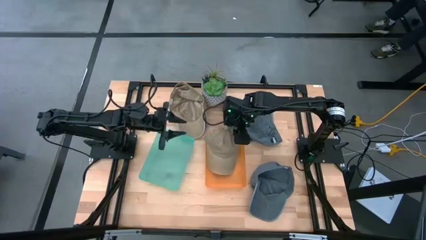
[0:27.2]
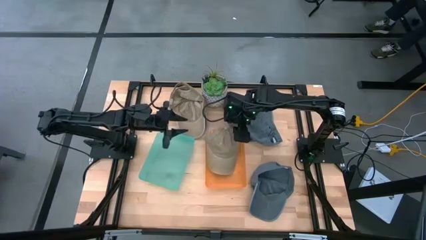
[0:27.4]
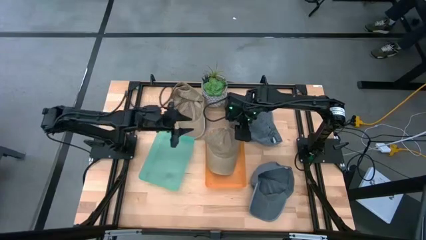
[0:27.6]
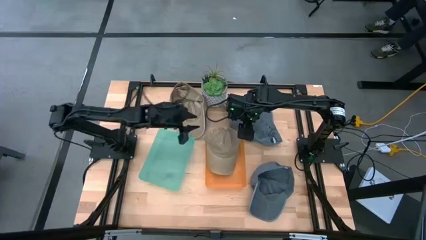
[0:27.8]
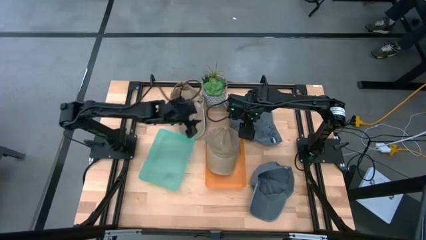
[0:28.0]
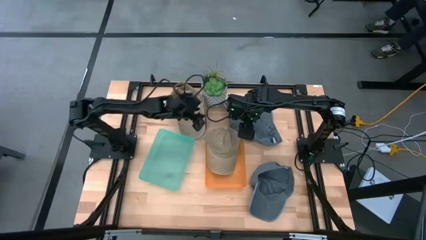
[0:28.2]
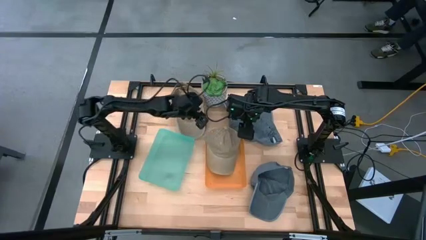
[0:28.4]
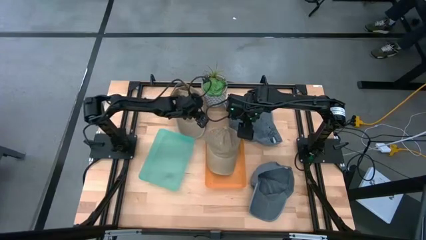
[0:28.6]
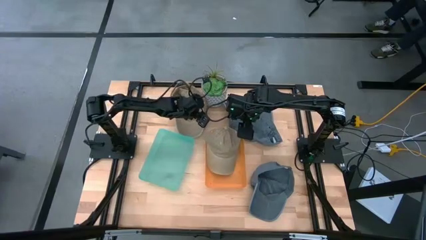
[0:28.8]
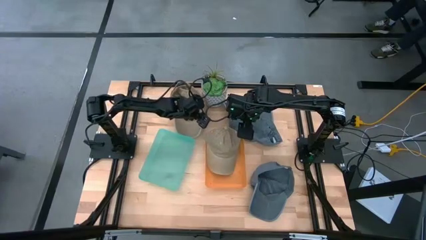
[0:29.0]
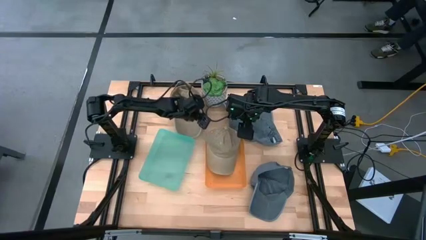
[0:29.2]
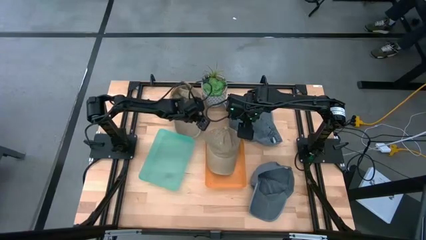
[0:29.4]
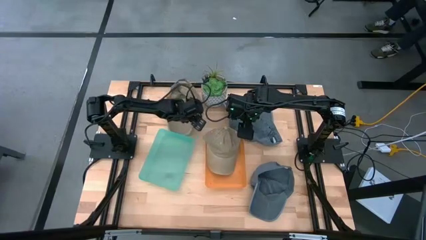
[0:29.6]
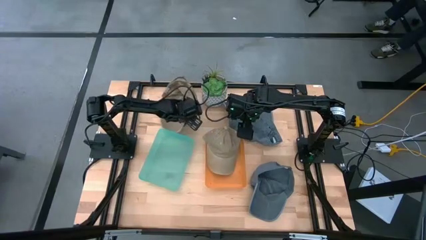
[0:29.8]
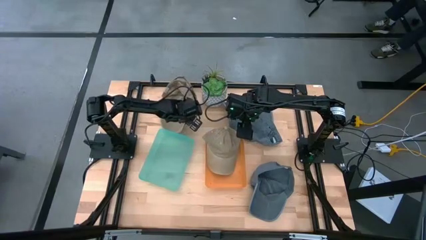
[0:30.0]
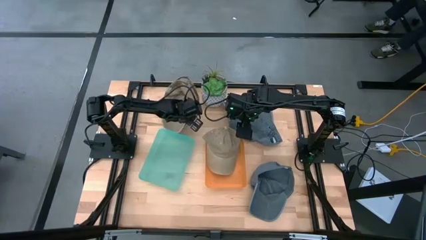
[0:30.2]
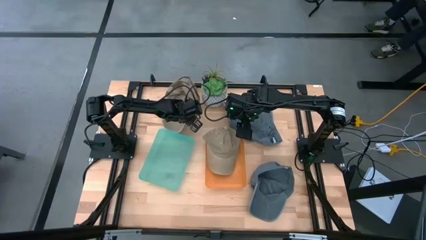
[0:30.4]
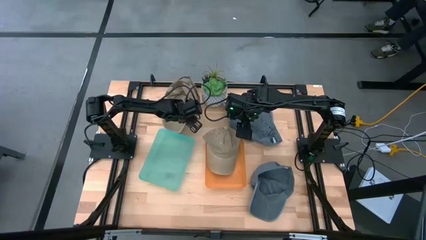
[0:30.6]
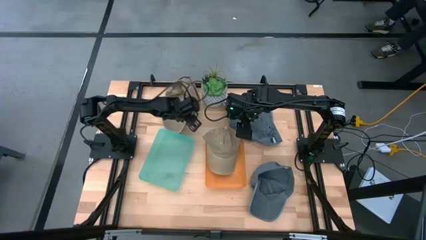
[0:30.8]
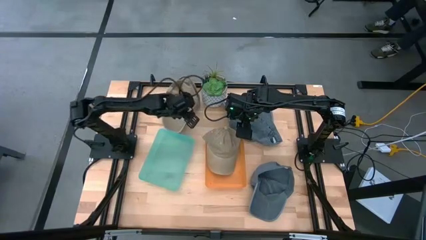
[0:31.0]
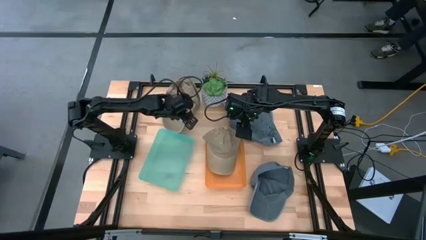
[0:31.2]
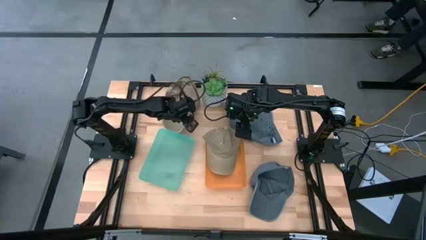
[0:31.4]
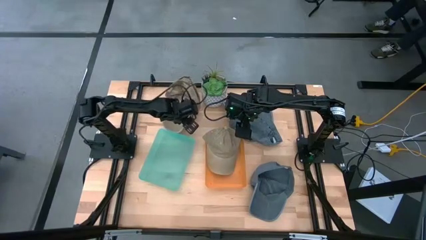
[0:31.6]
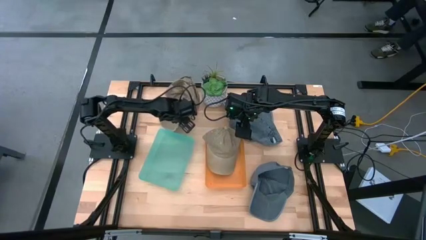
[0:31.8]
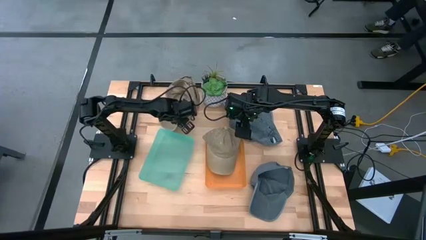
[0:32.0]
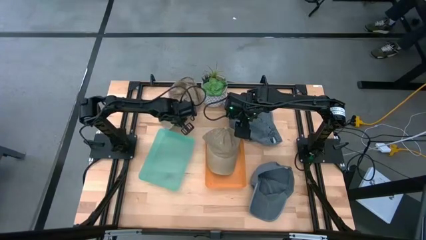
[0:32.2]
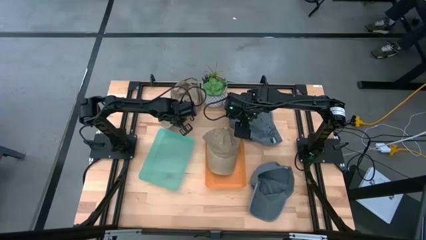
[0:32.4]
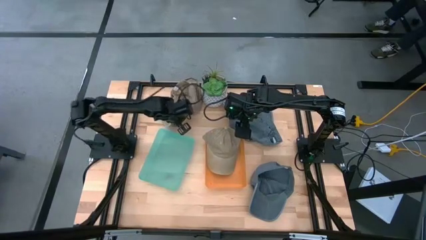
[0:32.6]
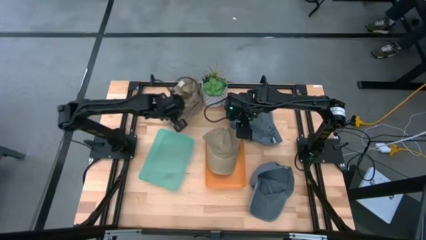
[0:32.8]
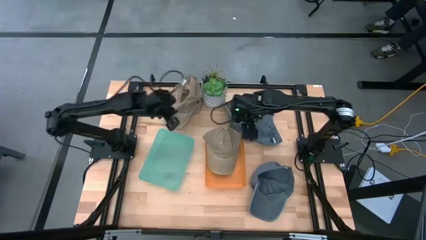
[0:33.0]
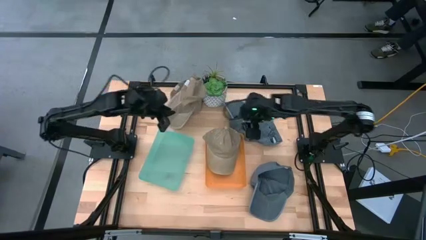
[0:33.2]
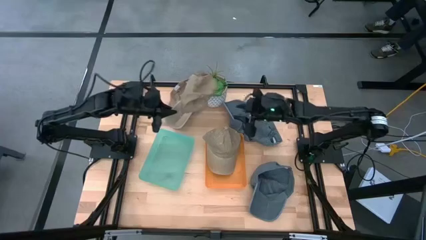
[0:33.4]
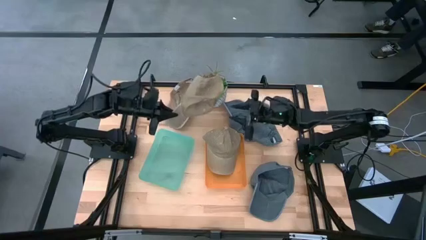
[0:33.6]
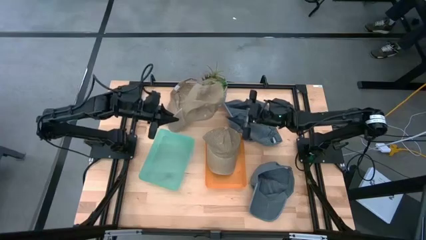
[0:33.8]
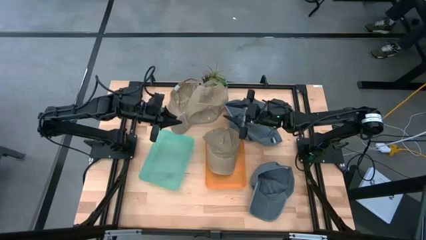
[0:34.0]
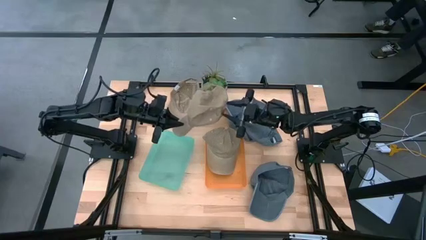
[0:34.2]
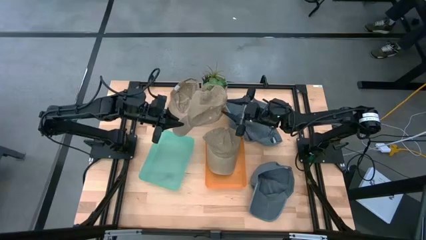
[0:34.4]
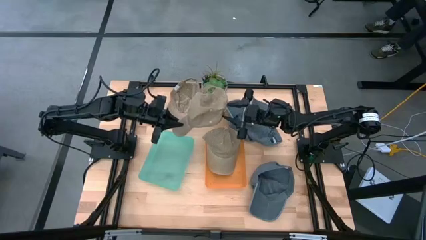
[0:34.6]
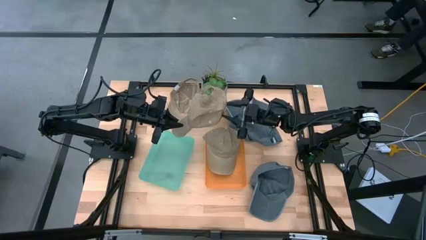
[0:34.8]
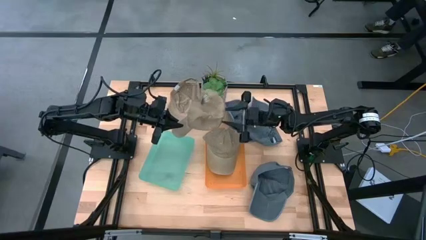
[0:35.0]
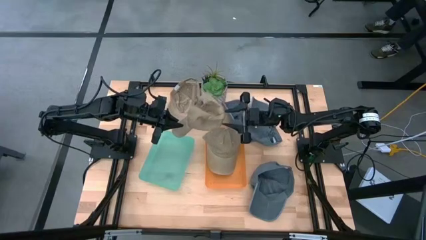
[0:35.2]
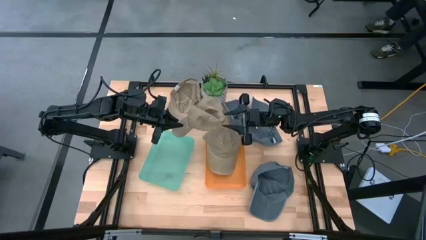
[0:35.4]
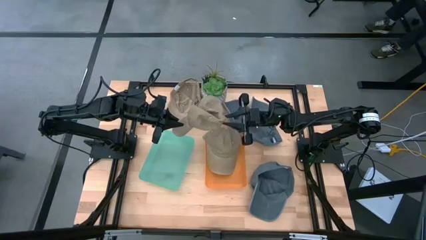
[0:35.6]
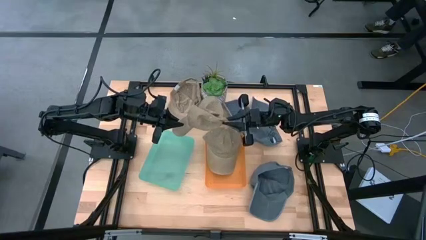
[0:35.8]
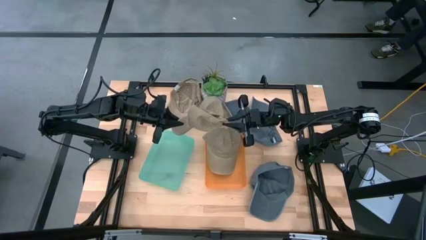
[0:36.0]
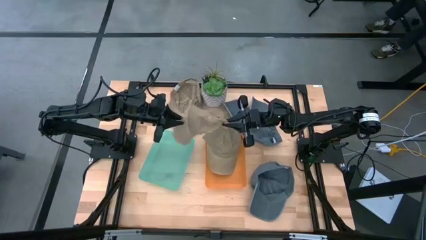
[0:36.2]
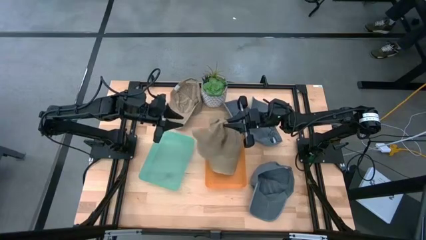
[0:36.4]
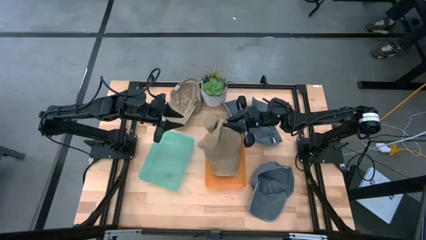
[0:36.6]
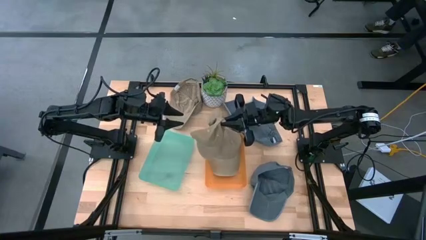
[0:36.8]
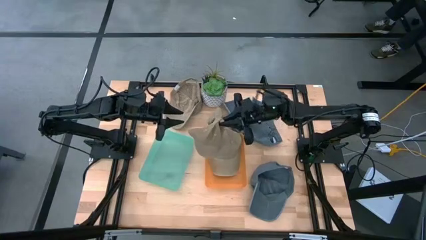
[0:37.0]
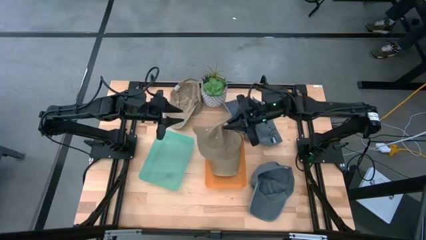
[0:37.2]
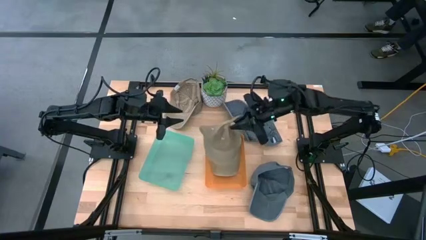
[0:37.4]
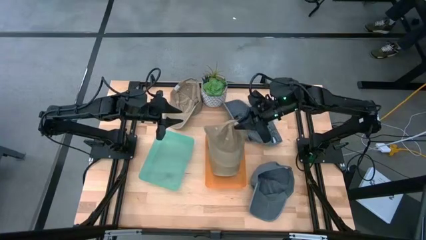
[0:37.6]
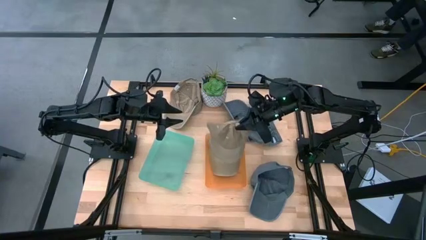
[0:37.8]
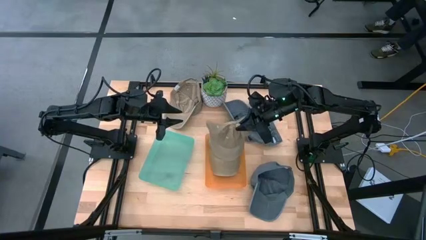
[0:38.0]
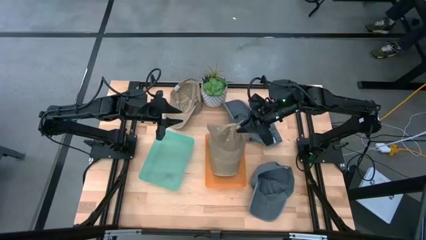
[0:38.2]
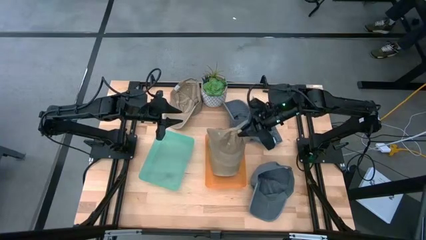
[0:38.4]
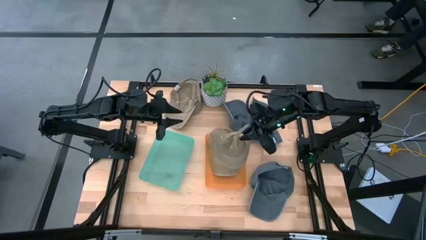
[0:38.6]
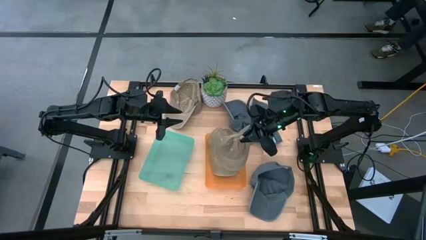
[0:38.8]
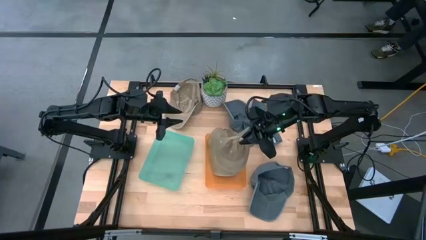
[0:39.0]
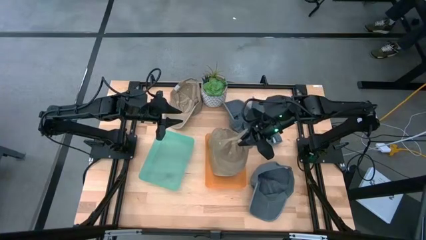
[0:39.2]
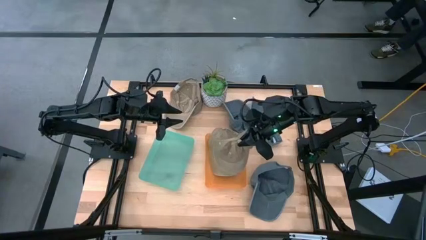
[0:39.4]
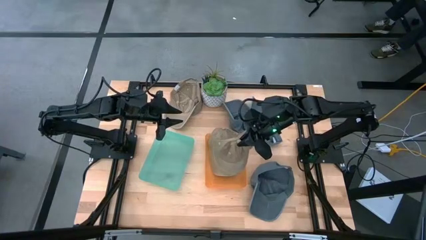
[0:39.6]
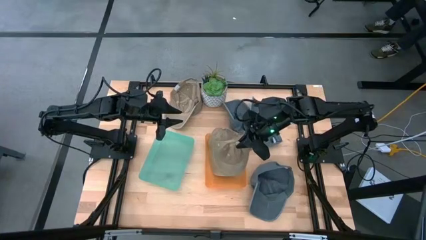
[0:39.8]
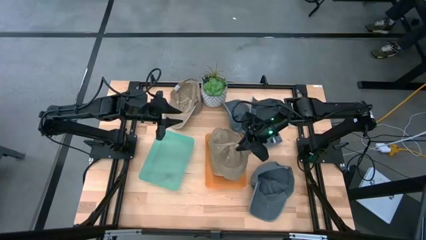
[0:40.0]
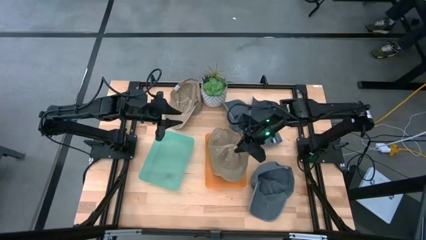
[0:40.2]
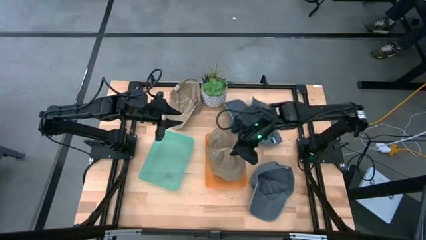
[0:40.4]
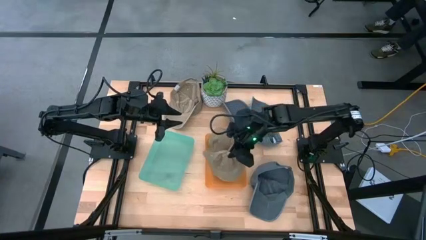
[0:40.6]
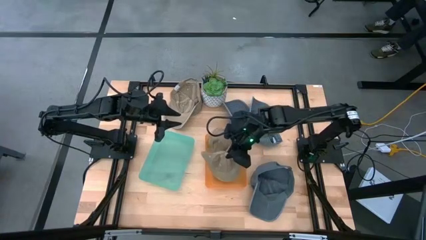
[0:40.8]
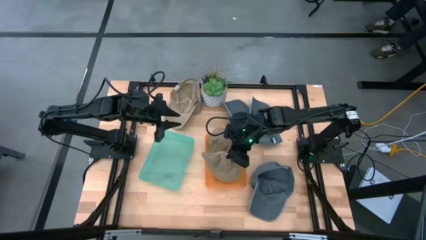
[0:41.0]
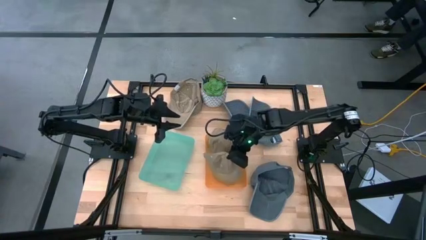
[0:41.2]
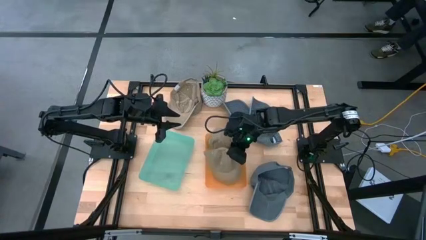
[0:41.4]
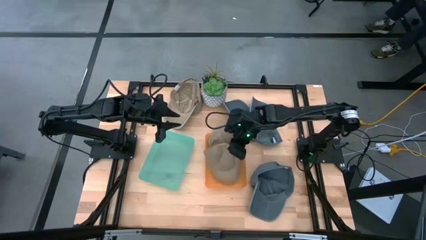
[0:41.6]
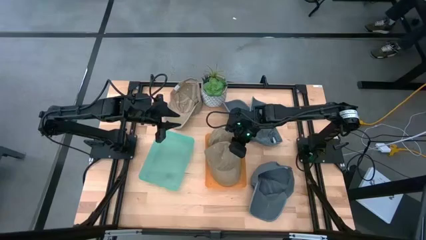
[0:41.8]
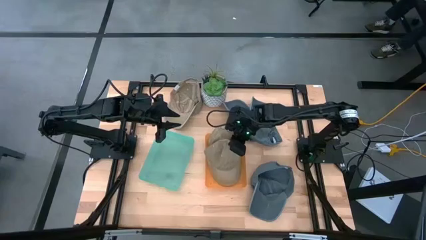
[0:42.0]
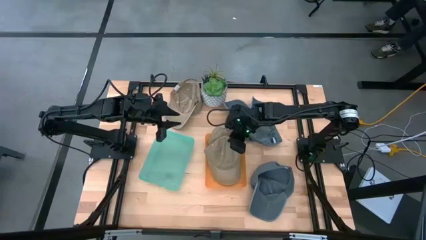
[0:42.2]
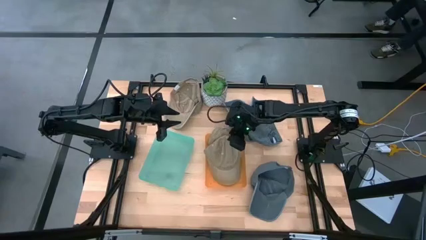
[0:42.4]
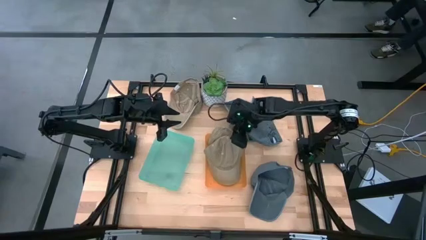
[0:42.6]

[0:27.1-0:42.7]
Task: Pick & Place hat
Put the left brown cap into the orange bin
